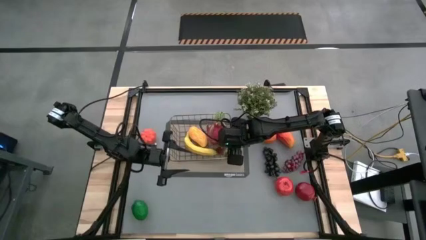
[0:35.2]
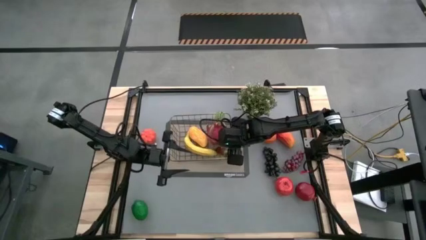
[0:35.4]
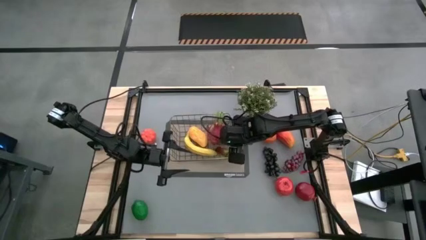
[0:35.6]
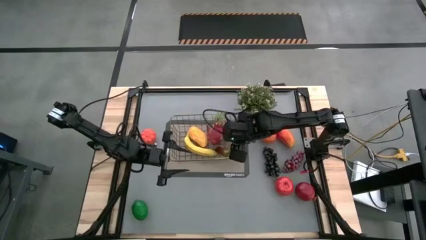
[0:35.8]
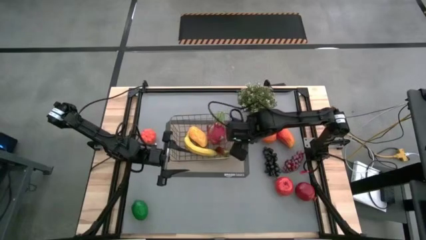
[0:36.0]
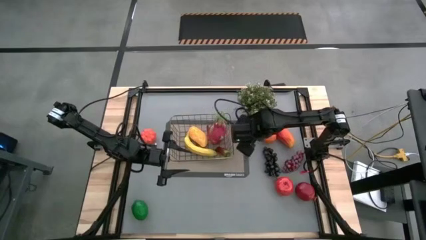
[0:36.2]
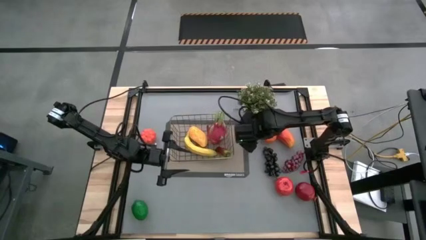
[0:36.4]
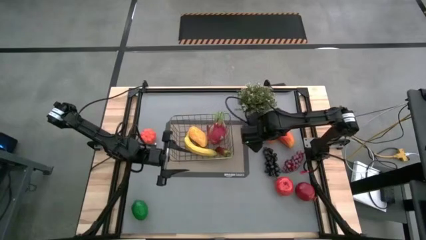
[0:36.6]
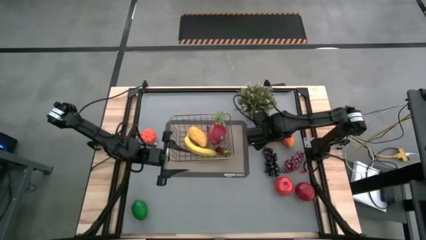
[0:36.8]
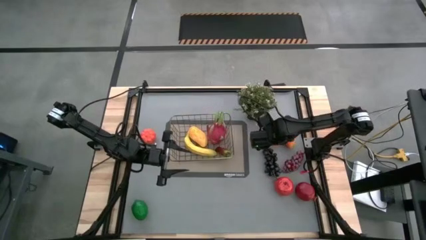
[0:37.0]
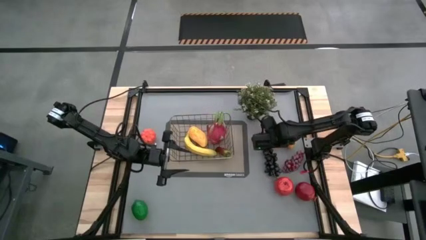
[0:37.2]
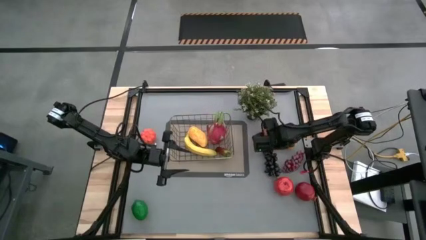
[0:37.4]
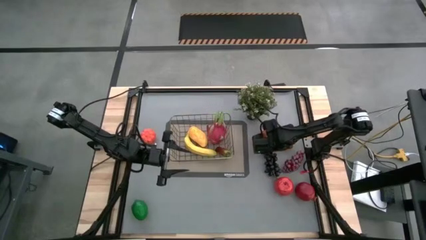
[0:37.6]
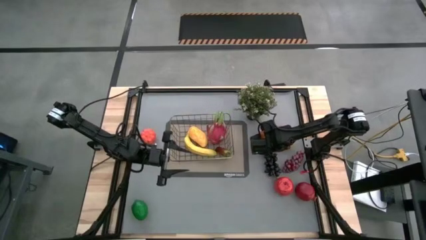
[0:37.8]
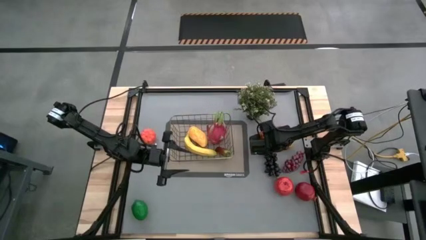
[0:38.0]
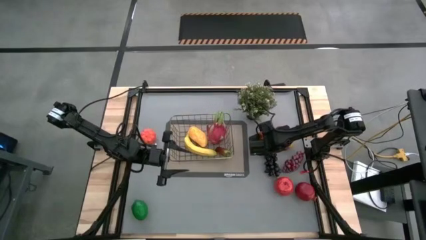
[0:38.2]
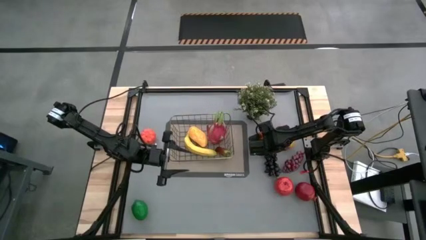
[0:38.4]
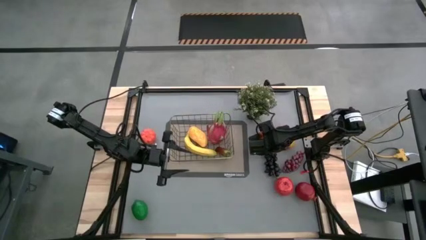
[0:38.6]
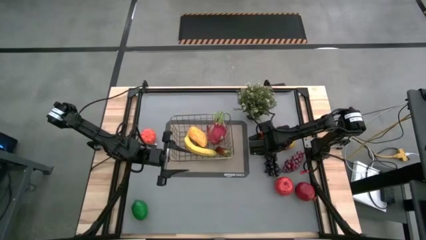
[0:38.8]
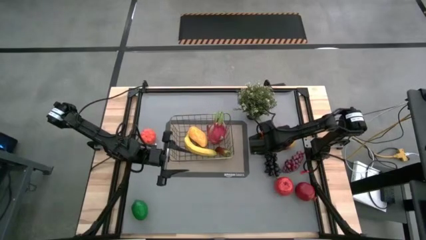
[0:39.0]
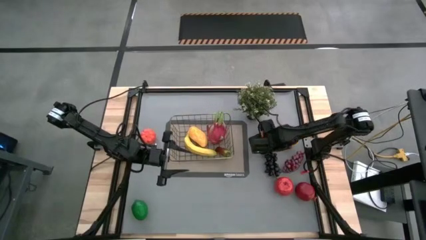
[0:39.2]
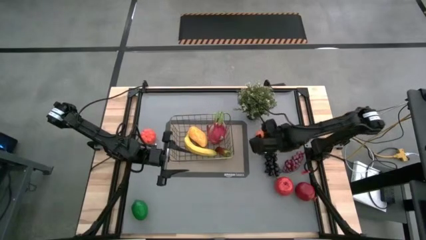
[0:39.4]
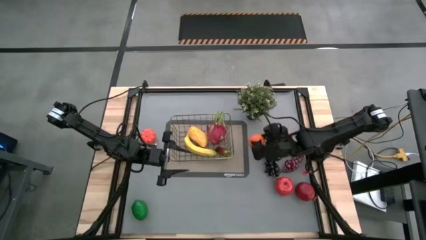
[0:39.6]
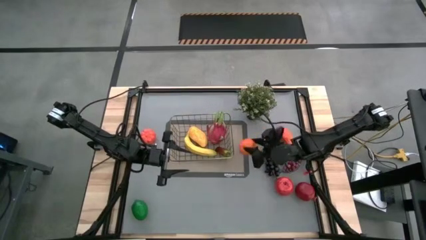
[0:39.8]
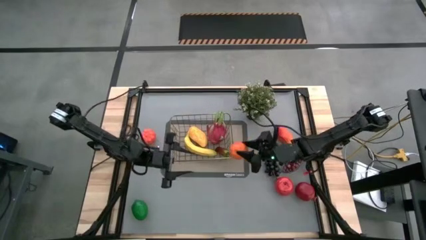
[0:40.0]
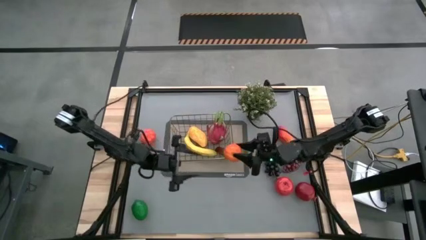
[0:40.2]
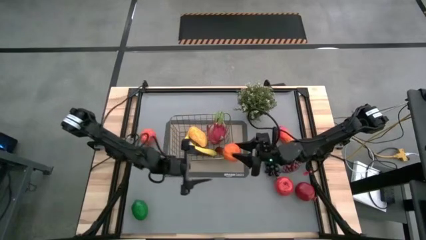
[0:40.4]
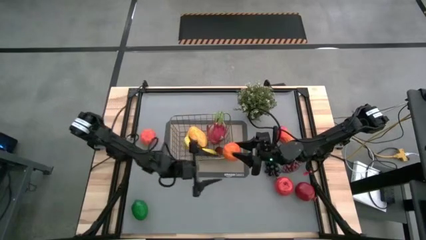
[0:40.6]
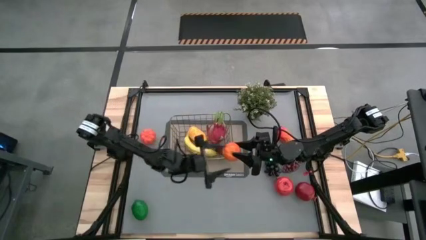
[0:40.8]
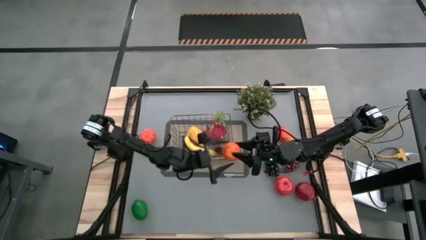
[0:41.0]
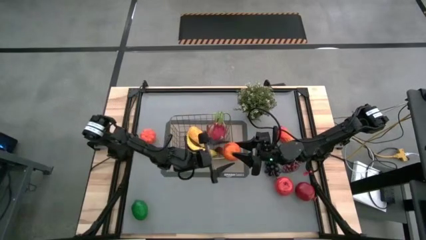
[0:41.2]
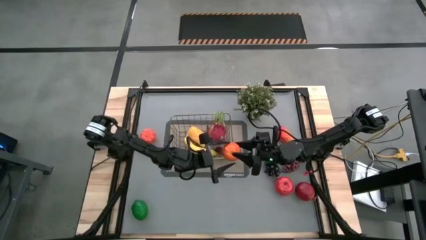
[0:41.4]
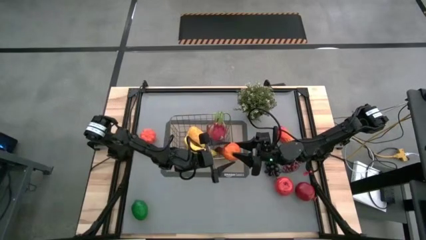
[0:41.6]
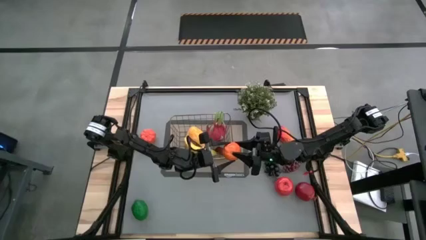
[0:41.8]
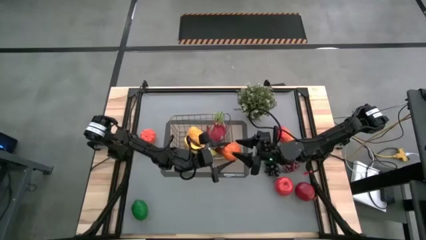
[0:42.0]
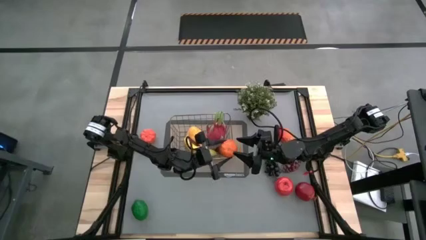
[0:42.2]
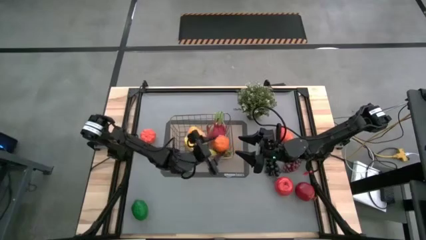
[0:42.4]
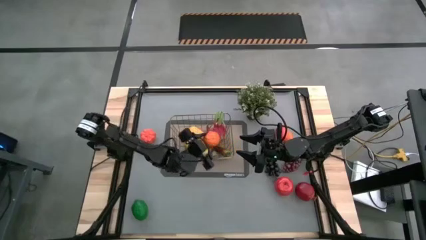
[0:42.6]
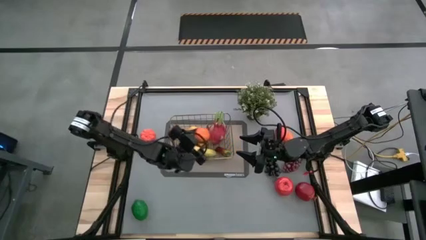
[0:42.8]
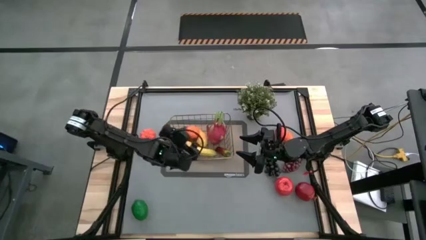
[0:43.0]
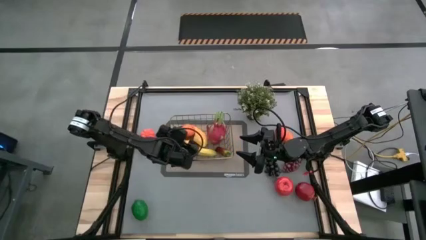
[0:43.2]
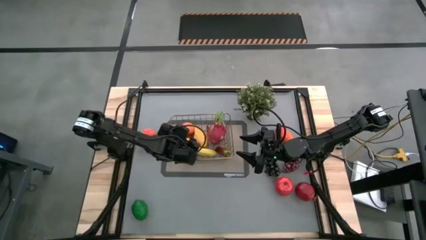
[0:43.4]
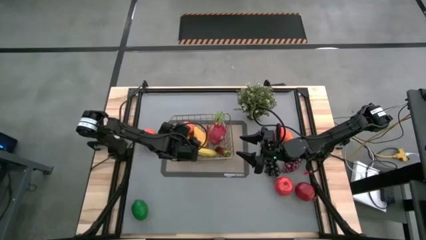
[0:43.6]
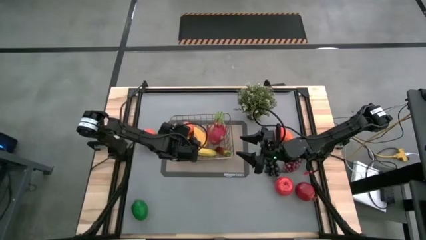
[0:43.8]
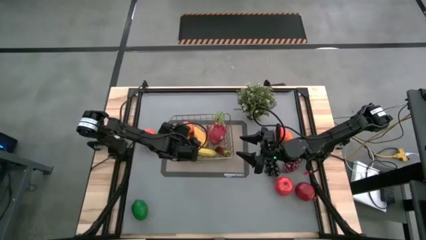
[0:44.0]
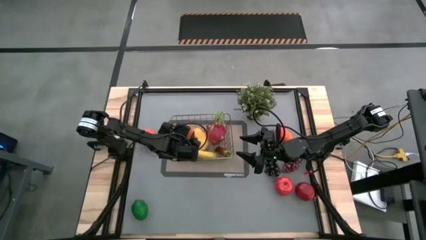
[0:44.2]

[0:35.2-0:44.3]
Task: Build produce basket
Put the orange into the wire basket

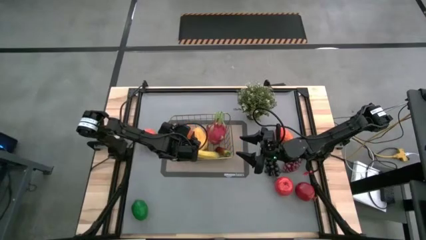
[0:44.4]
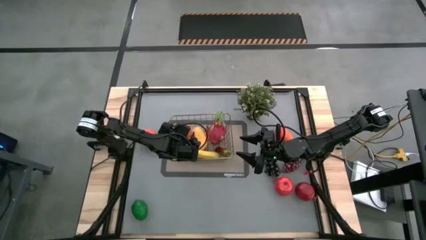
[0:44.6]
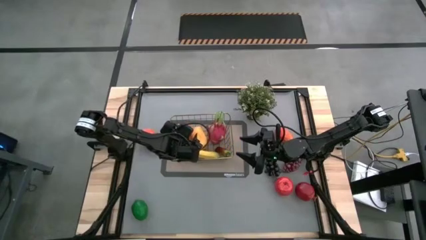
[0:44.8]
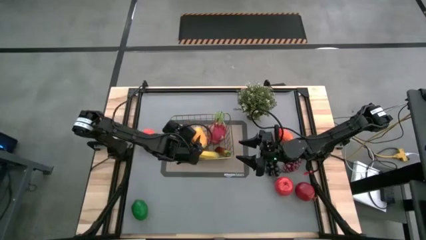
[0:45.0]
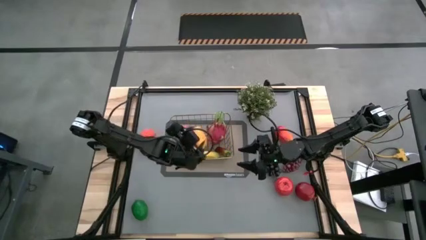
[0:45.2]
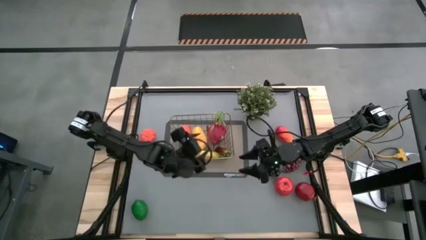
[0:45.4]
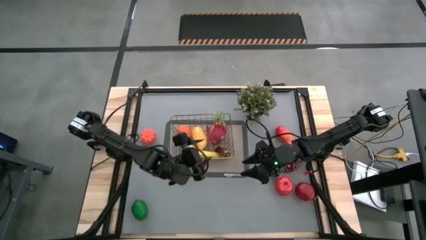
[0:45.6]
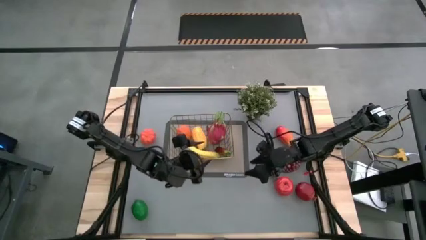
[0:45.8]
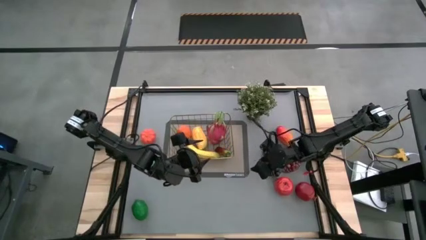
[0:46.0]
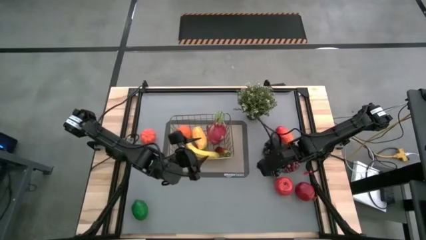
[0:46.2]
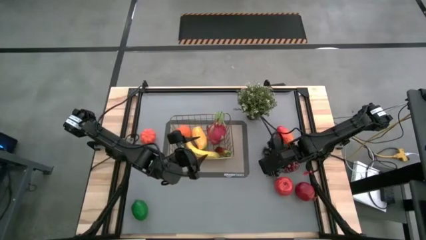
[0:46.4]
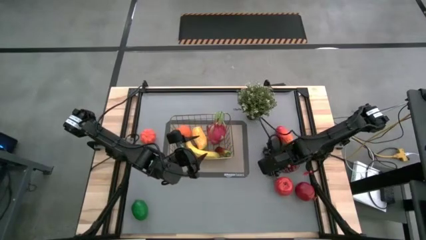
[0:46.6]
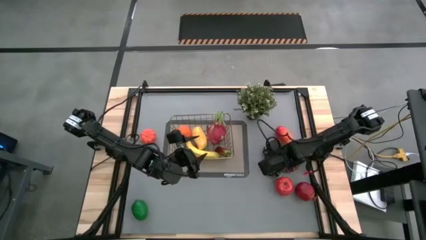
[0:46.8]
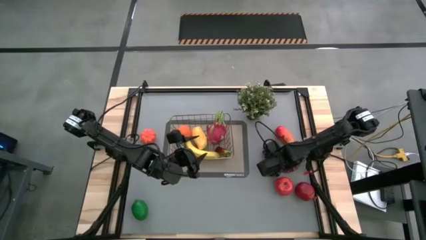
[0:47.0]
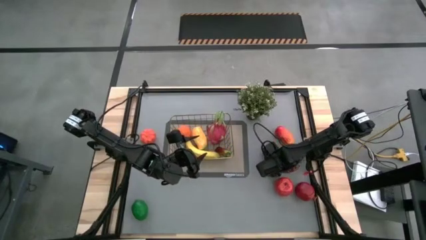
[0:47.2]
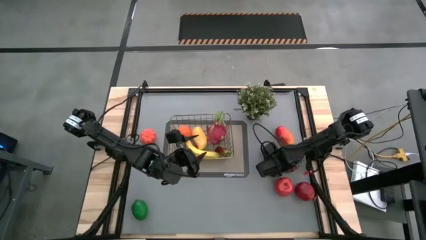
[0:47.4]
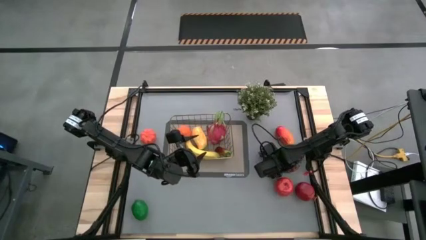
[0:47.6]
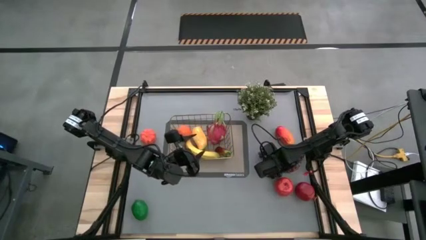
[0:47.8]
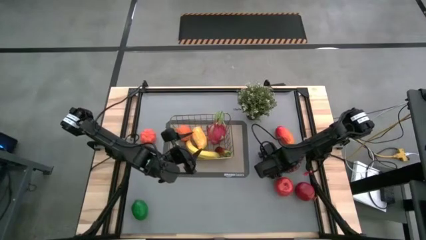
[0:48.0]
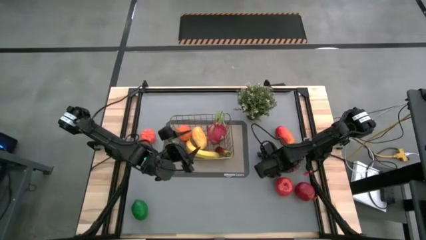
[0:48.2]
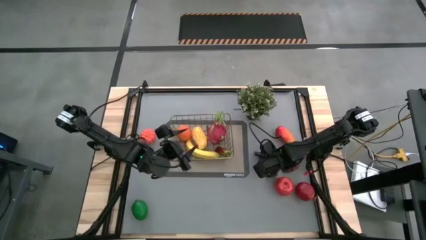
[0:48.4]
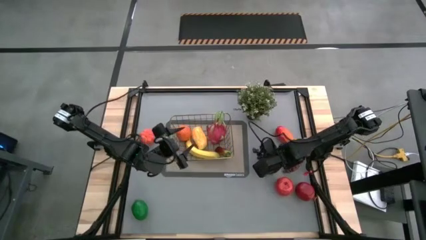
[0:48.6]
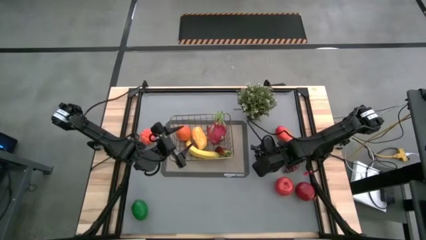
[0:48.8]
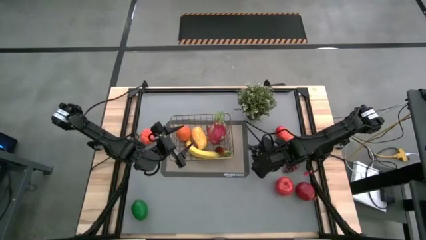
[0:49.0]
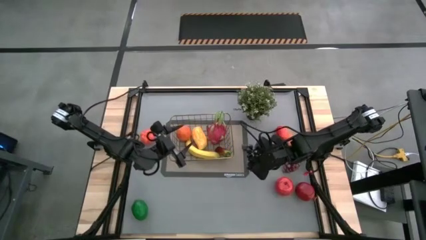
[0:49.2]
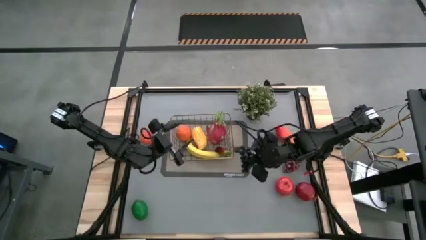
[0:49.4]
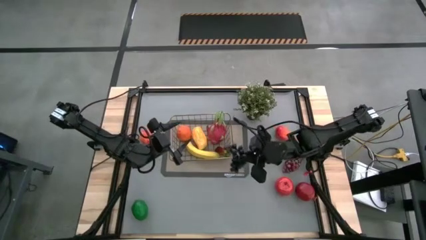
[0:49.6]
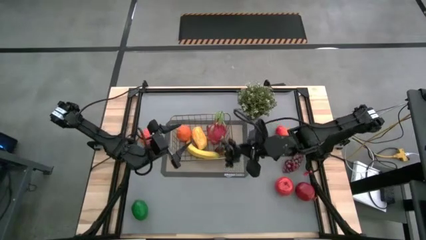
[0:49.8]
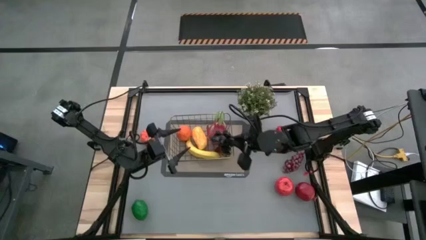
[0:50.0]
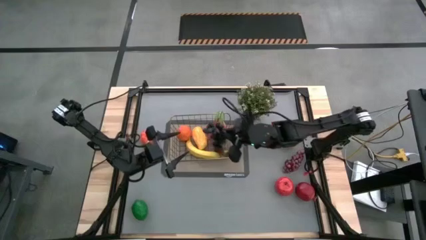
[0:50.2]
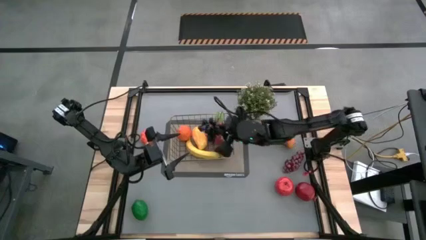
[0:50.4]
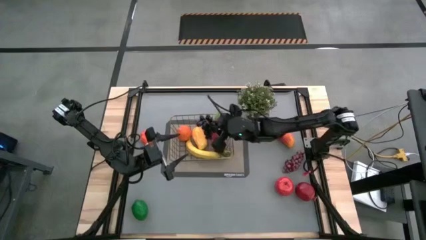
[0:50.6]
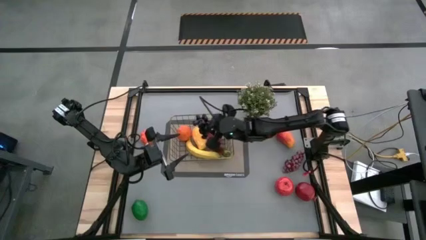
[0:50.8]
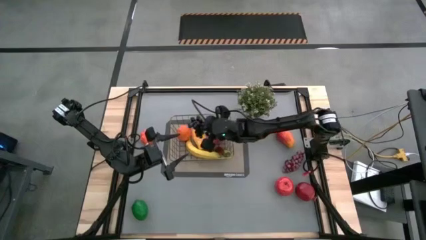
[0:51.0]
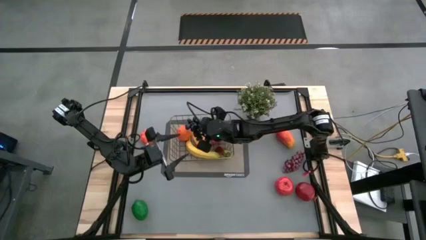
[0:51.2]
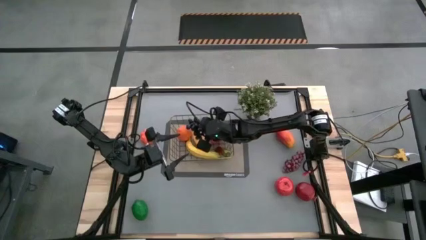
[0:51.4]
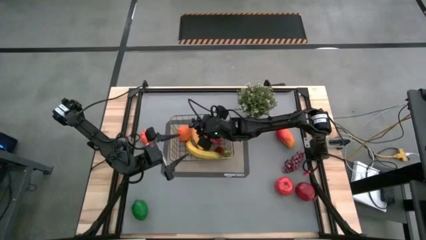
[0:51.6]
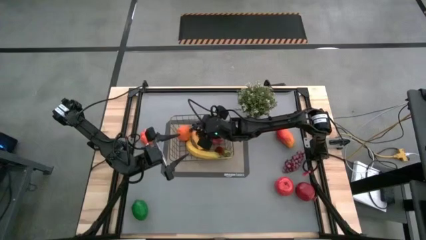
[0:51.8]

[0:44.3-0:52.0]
Put the grapes into the wire basket
